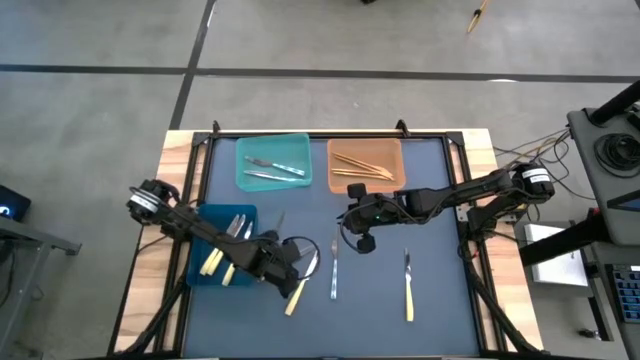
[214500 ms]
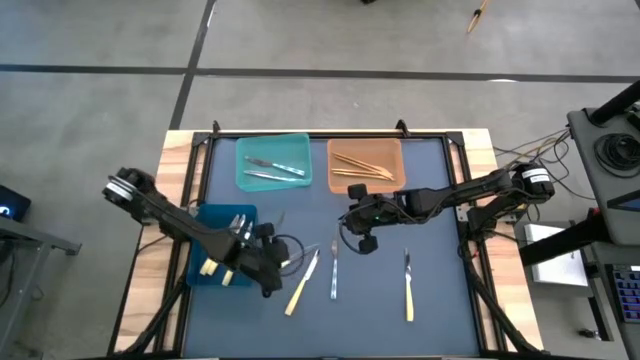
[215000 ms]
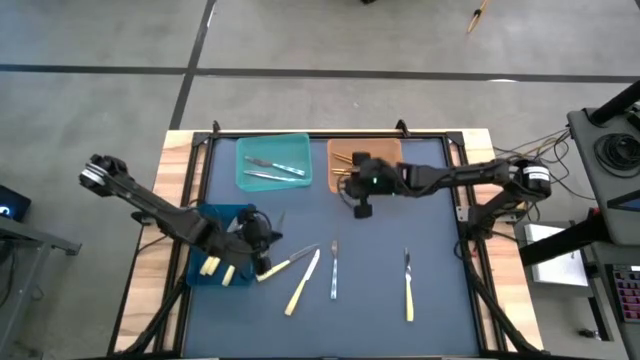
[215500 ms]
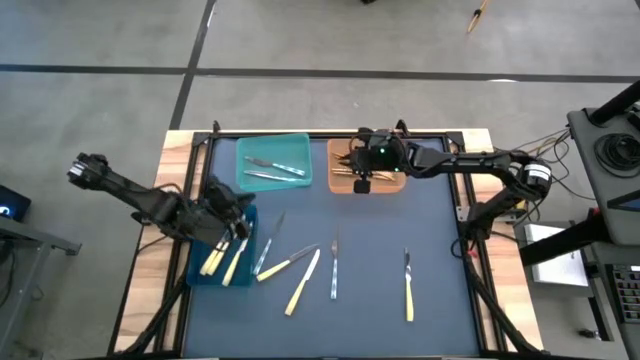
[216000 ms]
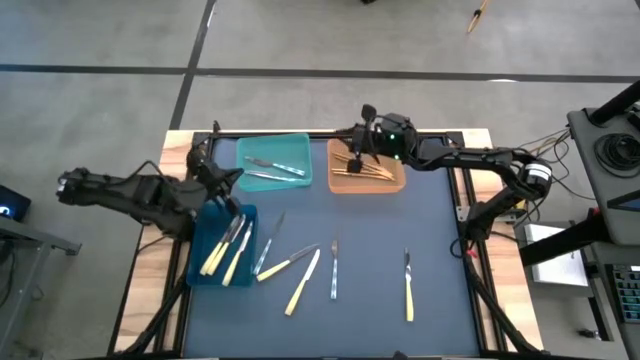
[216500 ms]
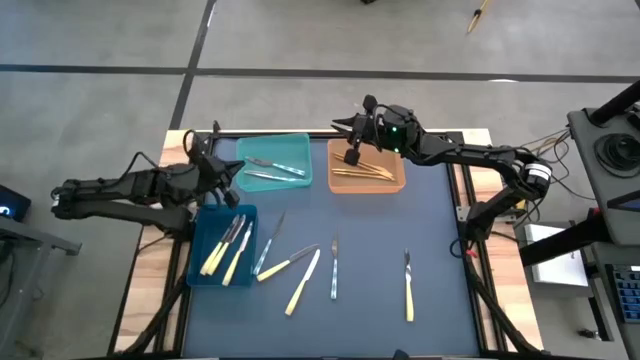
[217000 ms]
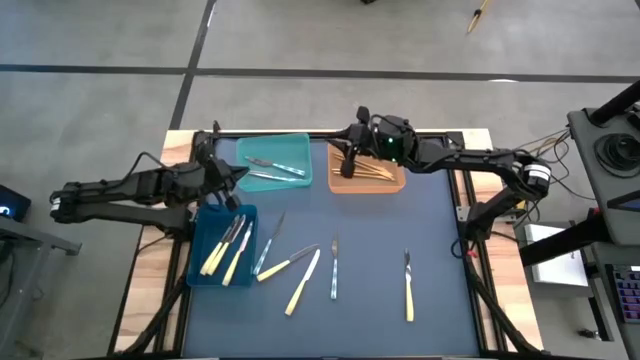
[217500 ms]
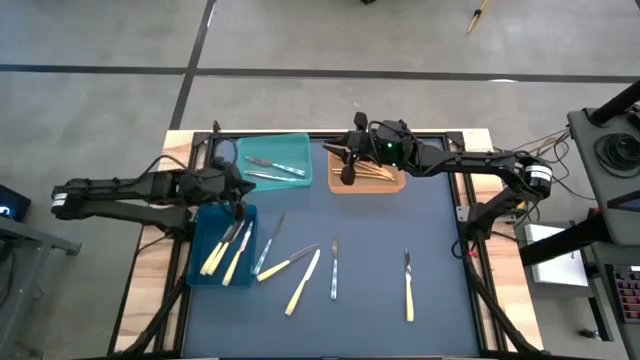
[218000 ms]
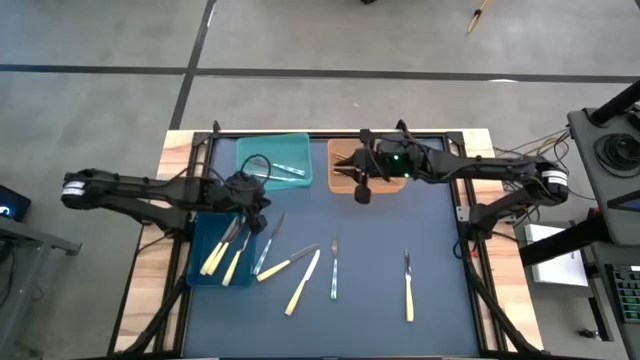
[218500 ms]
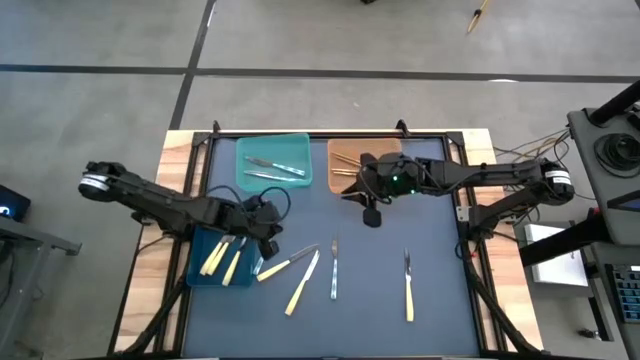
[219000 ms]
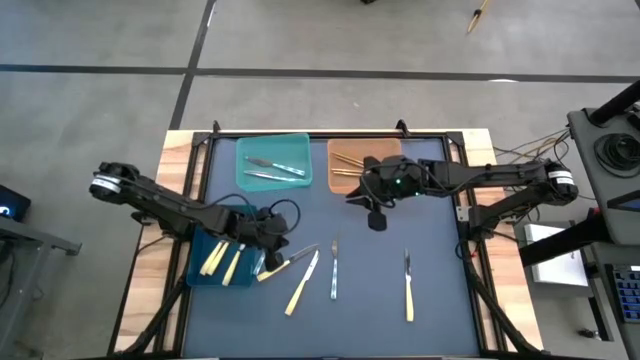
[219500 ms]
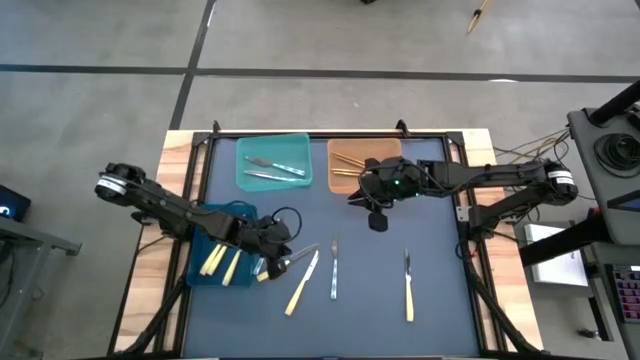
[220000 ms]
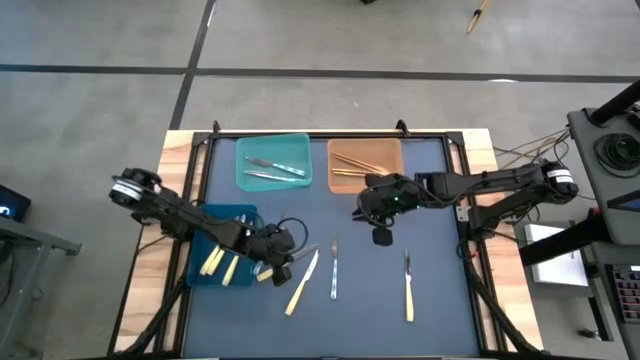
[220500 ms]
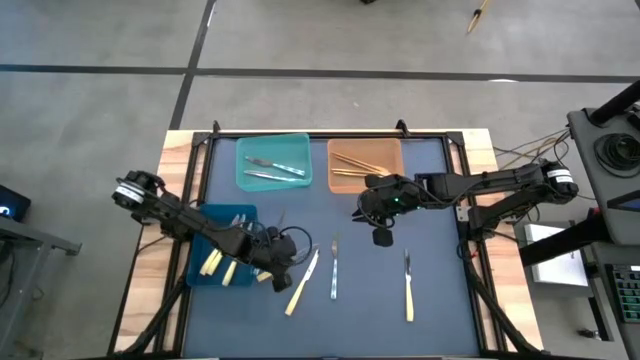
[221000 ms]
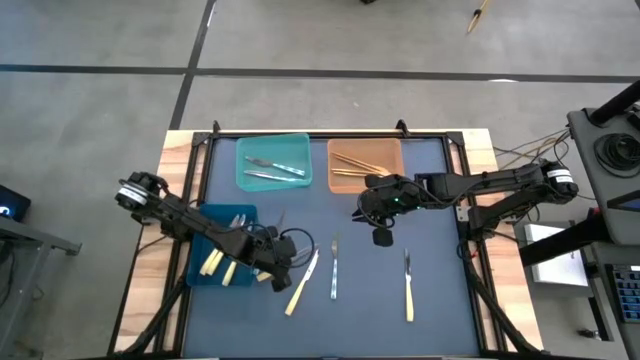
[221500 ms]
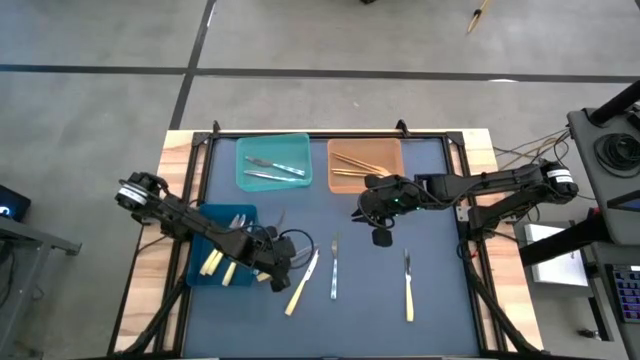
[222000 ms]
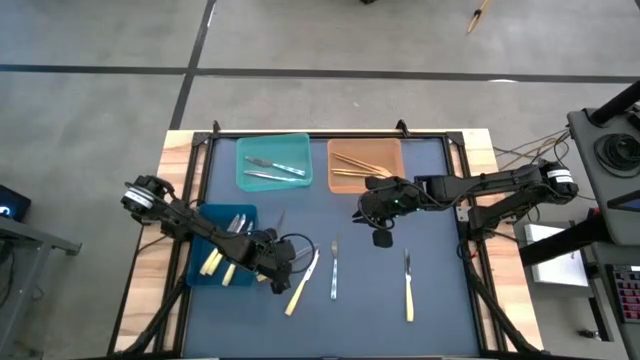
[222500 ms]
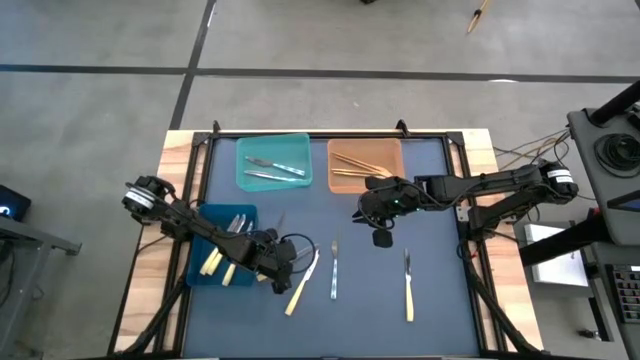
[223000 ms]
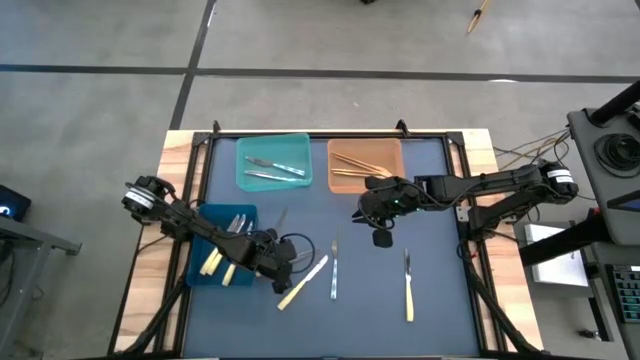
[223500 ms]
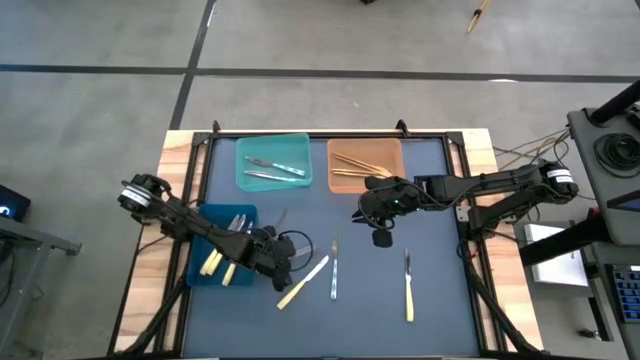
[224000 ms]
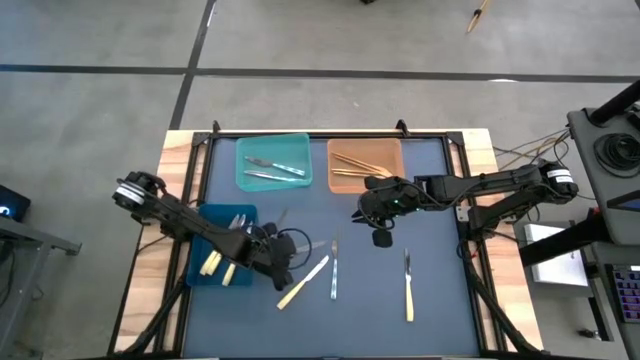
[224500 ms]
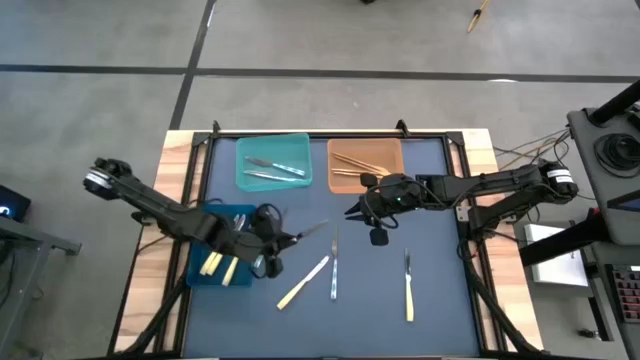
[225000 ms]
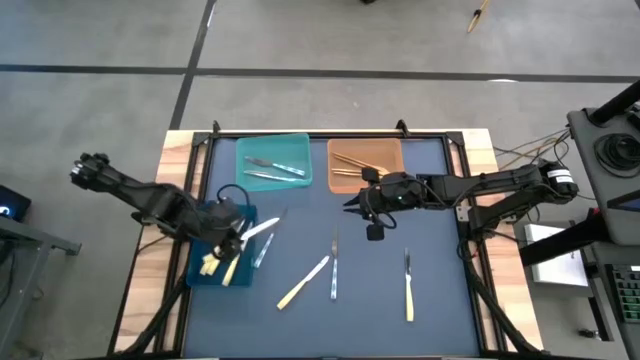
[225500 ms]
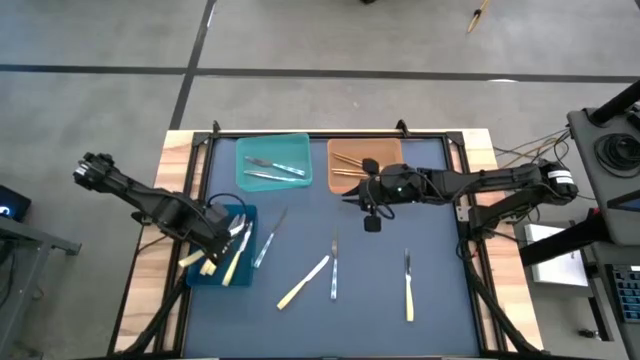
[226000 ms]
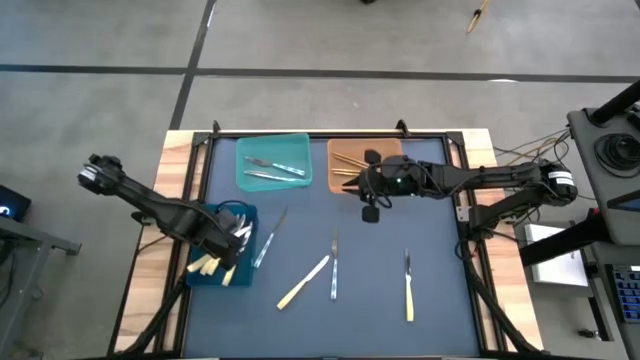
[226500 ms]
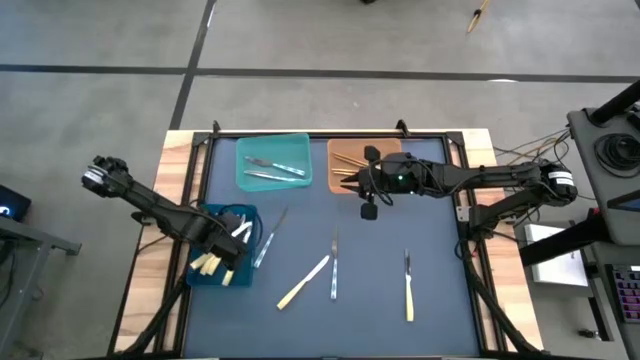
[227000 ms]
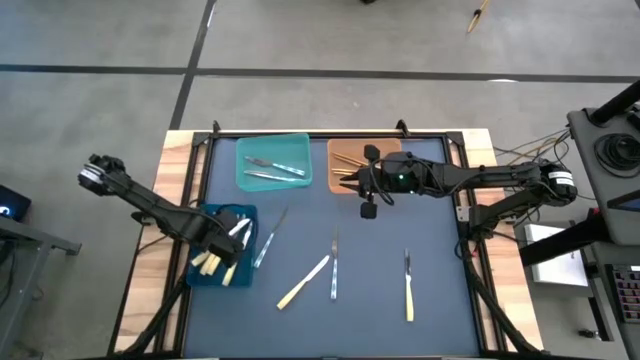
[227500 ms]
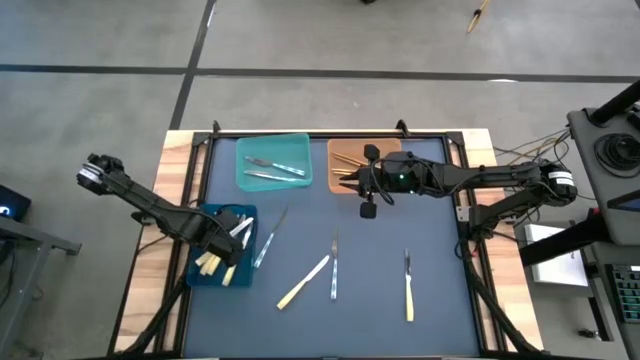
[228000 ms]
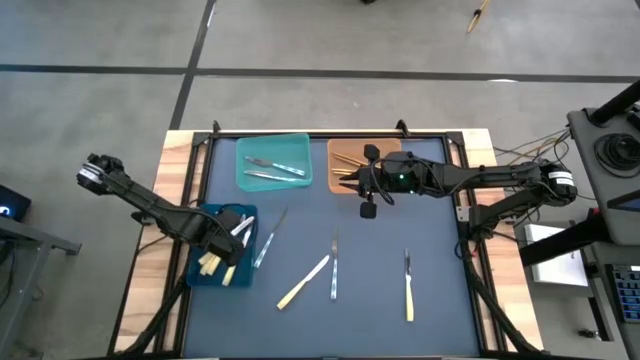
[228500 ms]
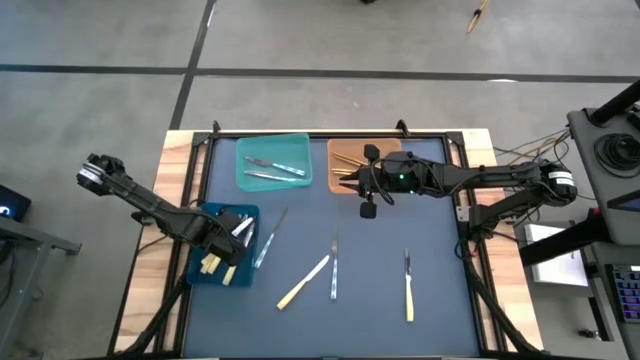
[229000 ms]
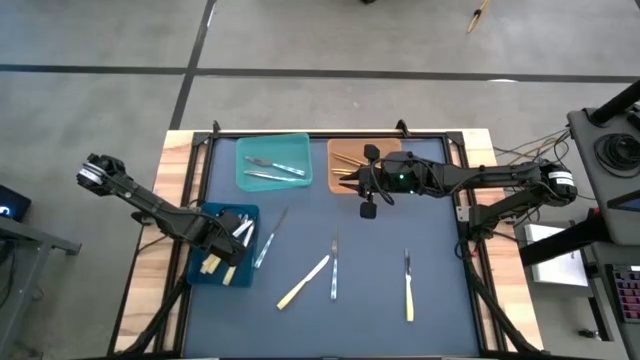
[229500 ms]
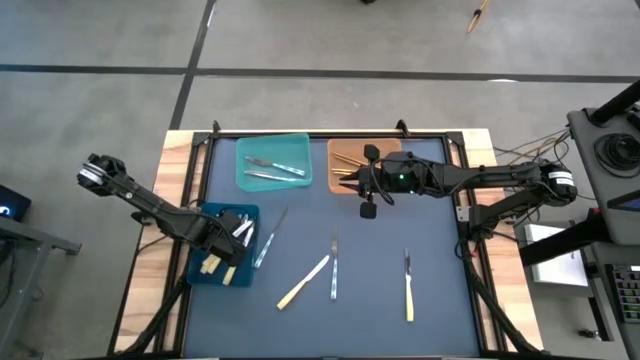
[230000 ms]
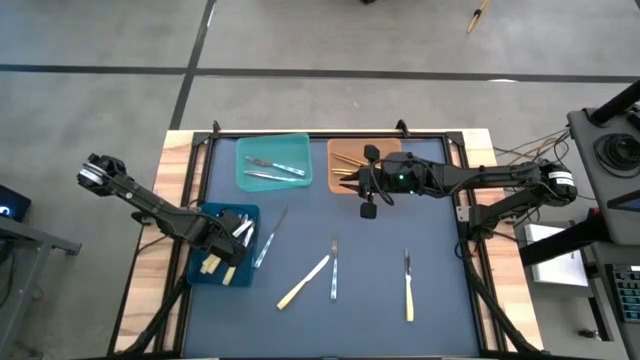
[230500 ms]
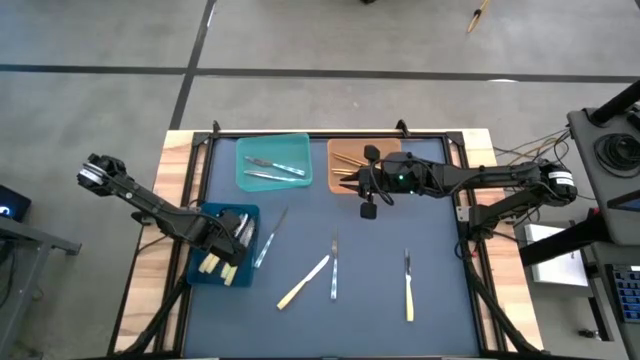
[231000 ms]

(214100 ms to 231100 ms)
Task: Sort silverware by color (type)
Put the light yellow knife into the blue bin

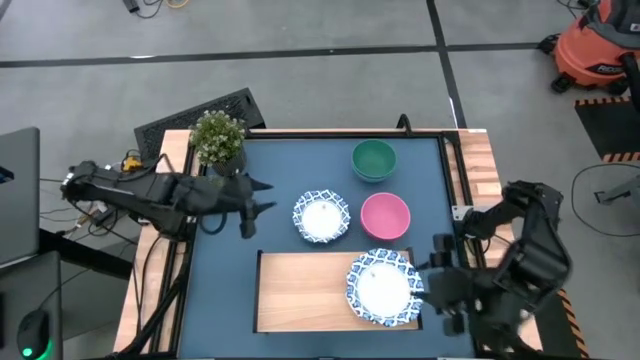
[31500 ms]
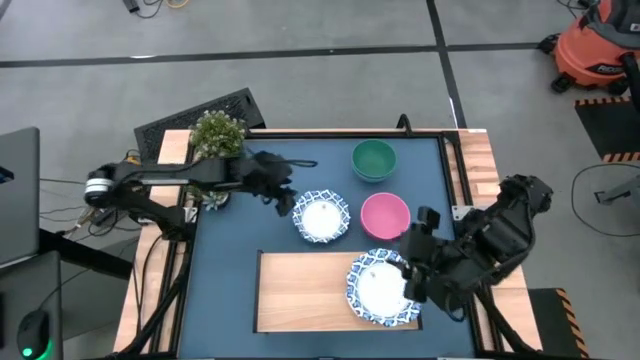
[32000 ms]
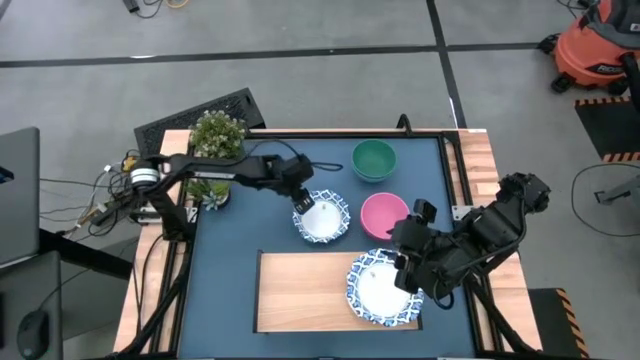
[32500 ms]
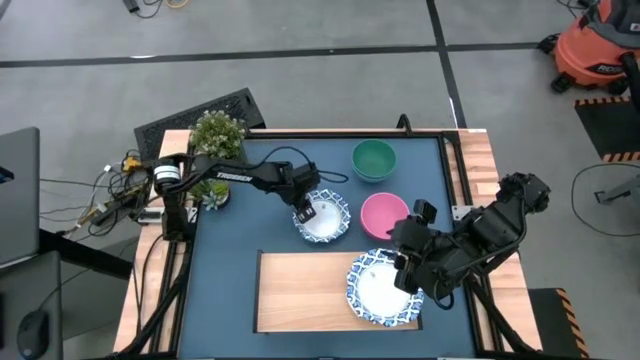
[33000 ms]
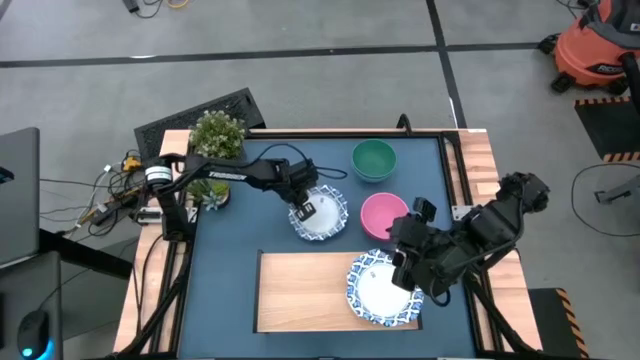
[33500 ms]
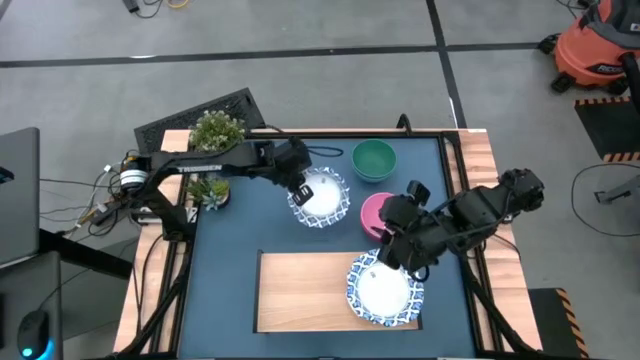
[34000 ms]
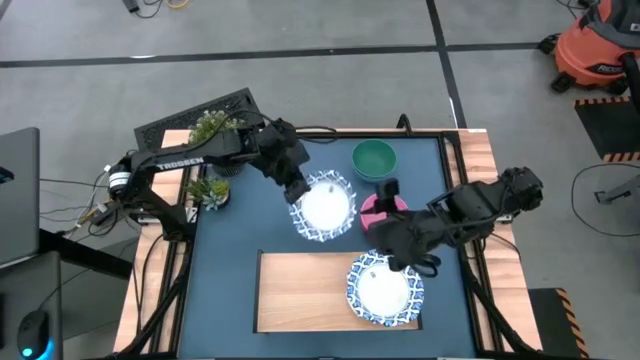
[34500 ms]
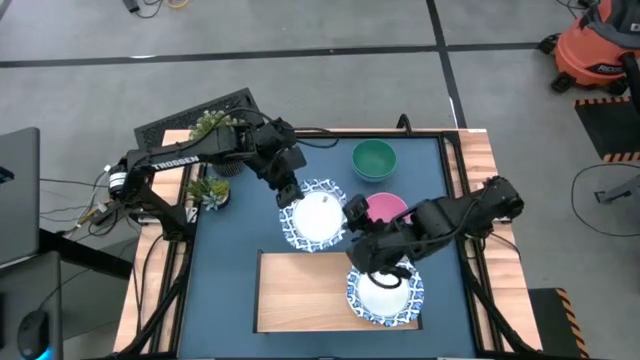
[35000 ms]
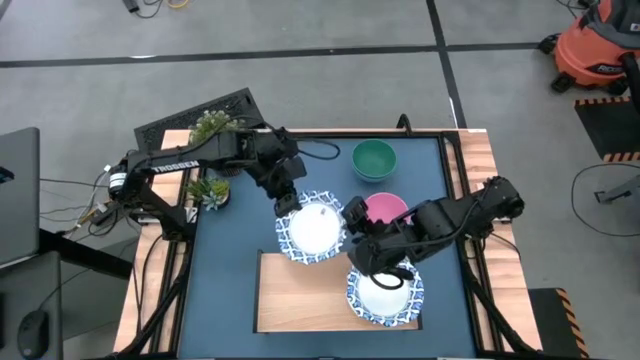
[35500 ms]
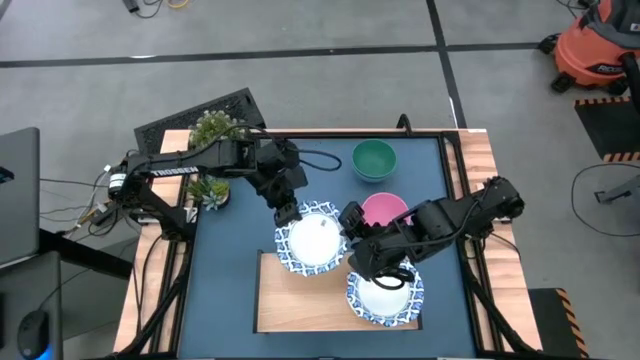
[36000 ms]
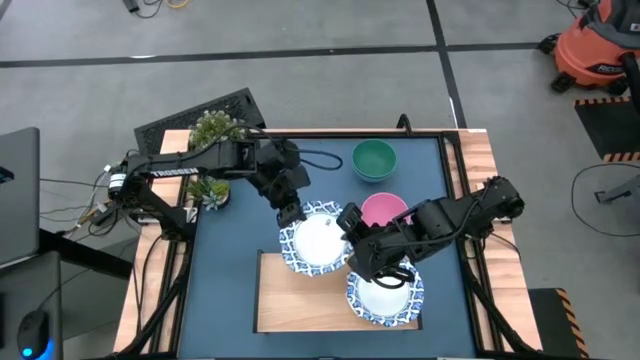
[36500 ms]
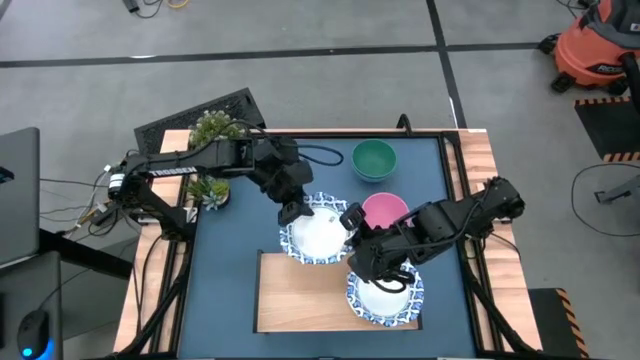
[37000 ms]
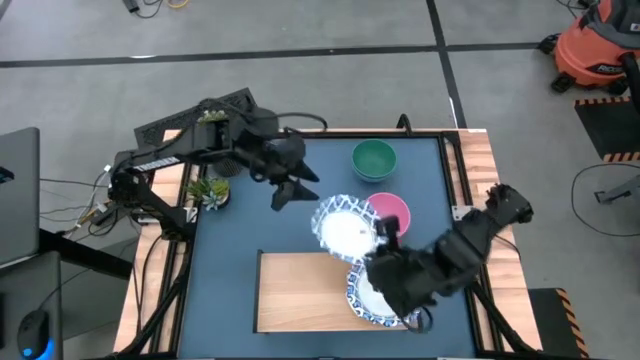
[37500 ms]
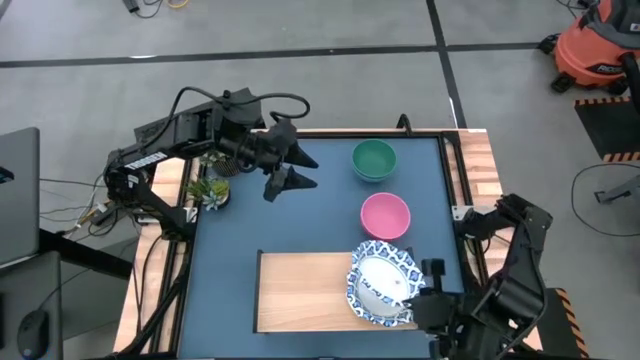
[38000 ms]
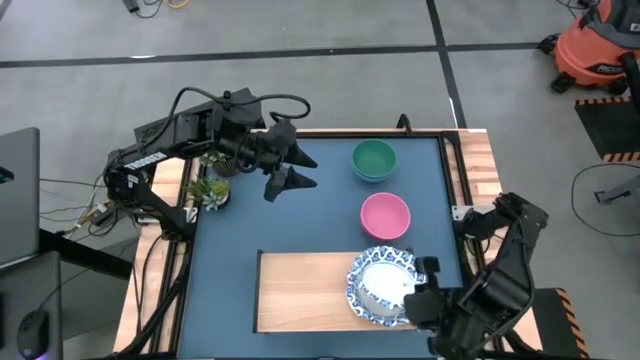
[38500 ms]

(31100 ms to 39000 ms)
Task: Place and stack bowls onto a shelf
Stack the blue patterned bowl on top of the blue patterned bowl on the shelf
